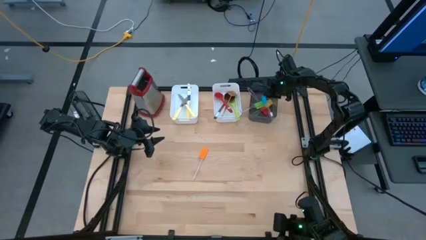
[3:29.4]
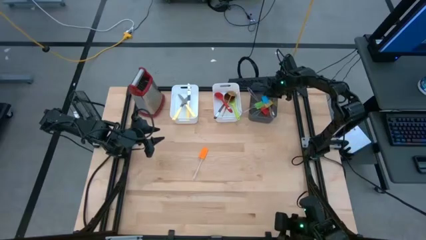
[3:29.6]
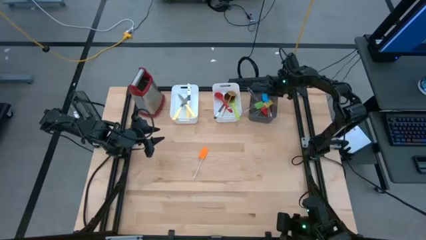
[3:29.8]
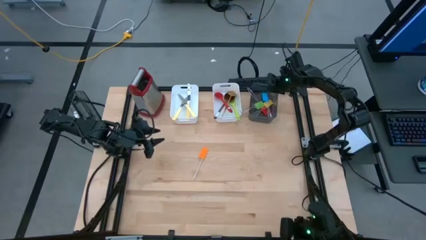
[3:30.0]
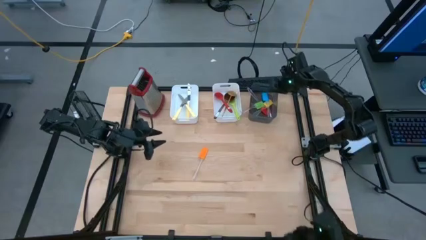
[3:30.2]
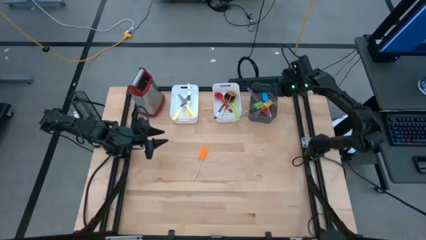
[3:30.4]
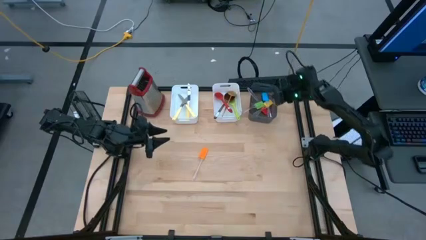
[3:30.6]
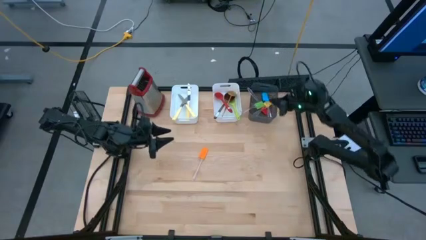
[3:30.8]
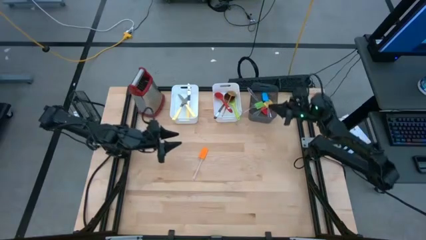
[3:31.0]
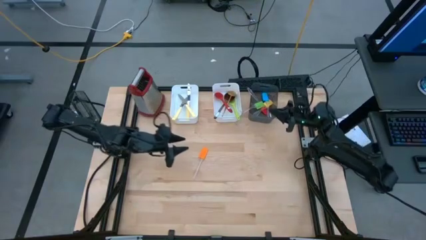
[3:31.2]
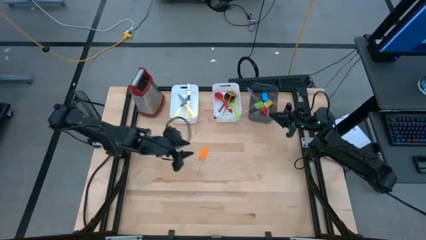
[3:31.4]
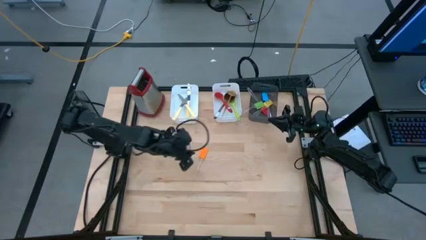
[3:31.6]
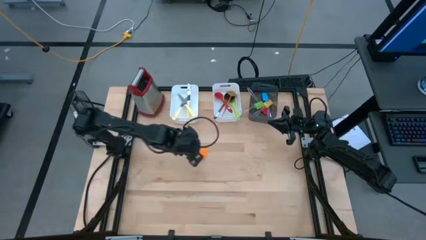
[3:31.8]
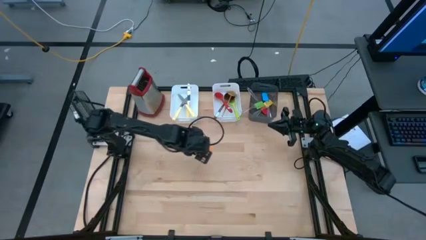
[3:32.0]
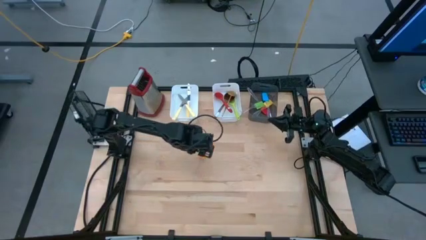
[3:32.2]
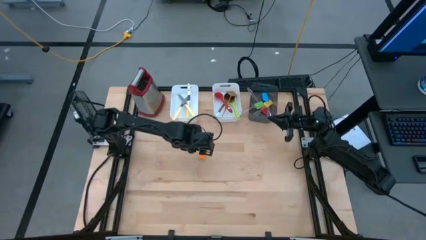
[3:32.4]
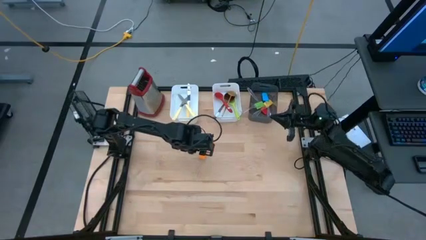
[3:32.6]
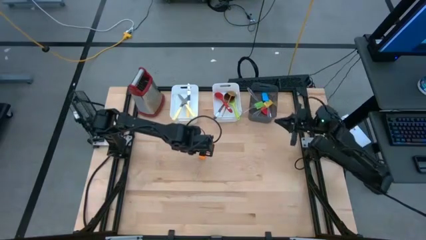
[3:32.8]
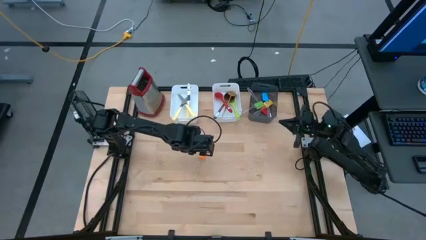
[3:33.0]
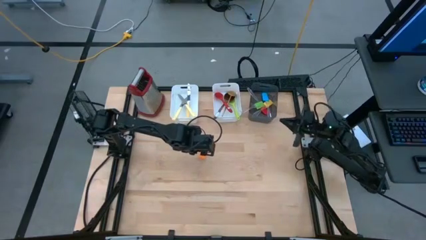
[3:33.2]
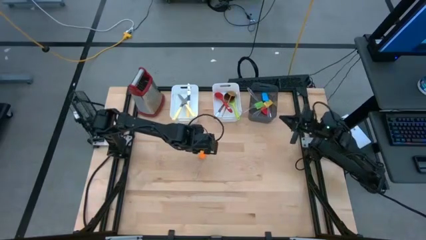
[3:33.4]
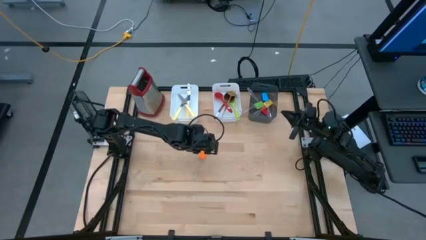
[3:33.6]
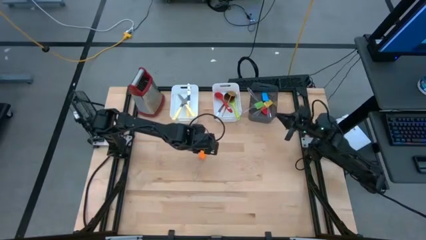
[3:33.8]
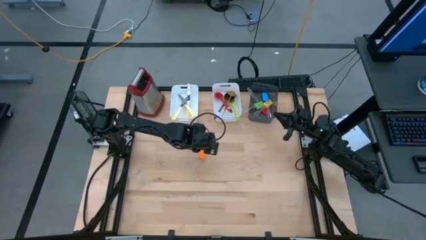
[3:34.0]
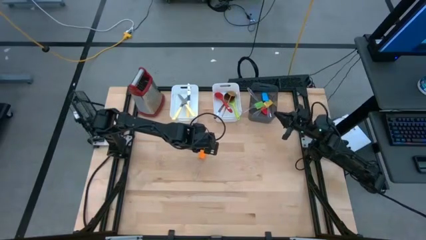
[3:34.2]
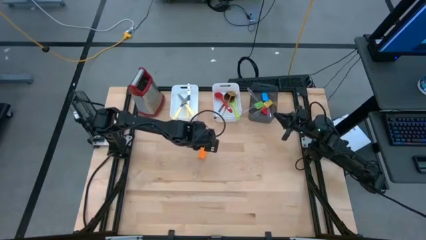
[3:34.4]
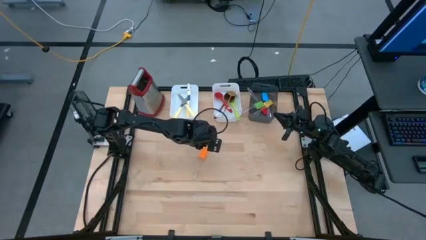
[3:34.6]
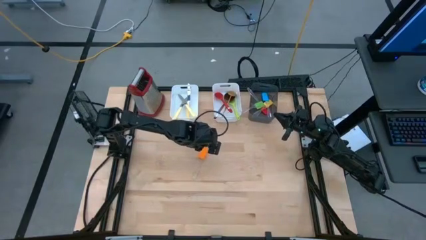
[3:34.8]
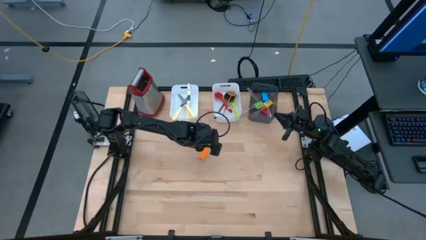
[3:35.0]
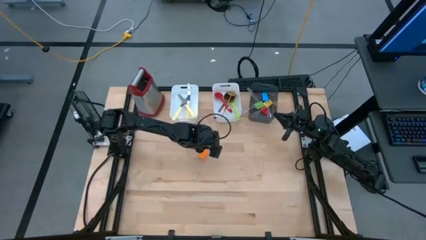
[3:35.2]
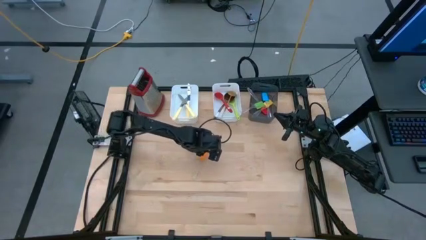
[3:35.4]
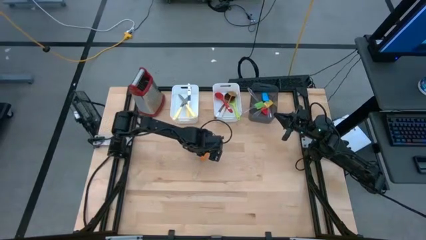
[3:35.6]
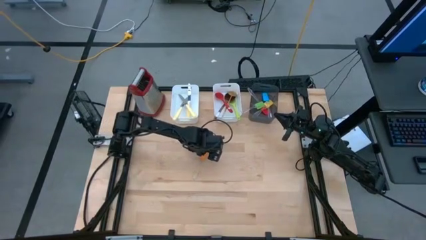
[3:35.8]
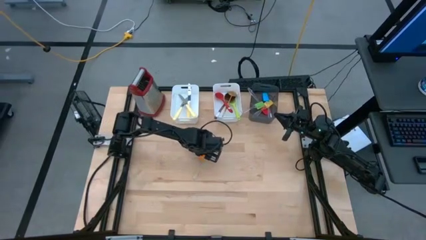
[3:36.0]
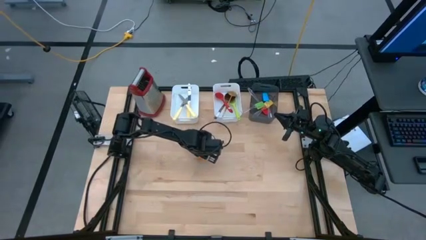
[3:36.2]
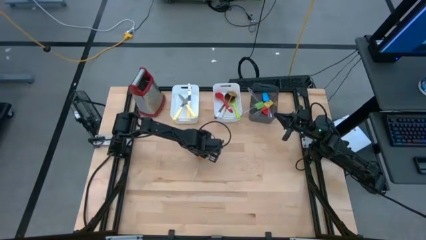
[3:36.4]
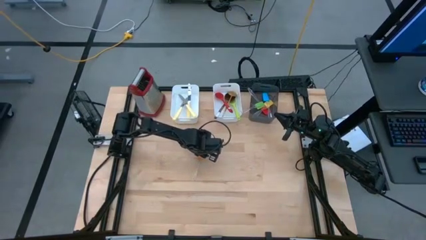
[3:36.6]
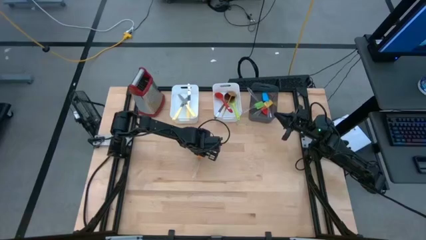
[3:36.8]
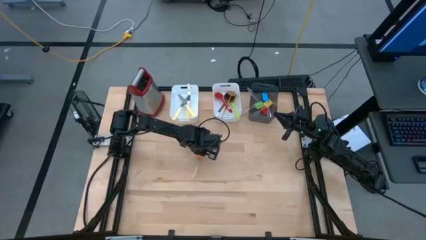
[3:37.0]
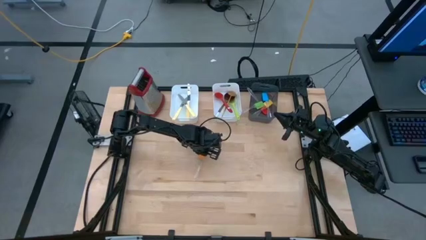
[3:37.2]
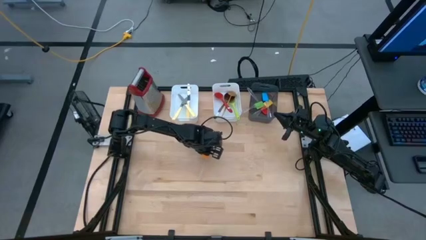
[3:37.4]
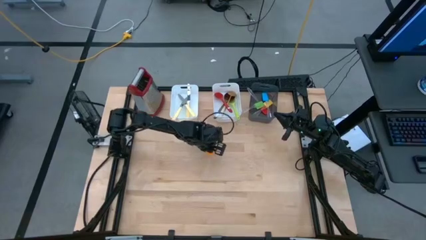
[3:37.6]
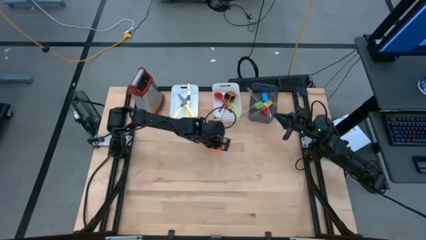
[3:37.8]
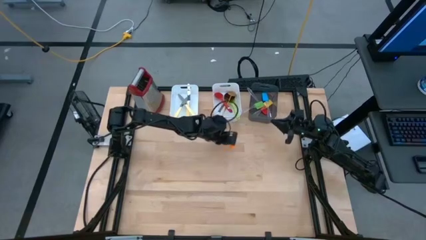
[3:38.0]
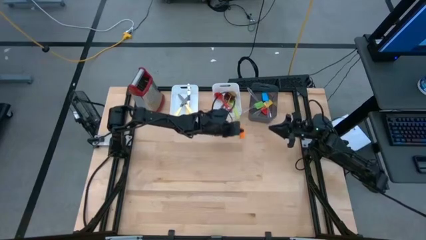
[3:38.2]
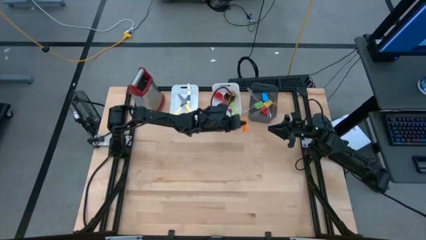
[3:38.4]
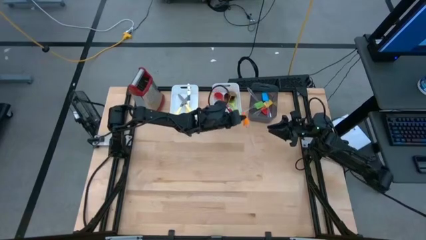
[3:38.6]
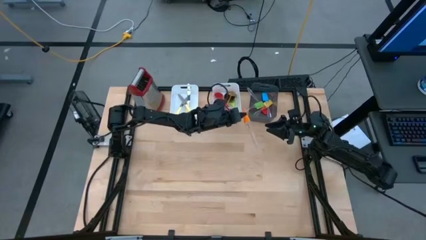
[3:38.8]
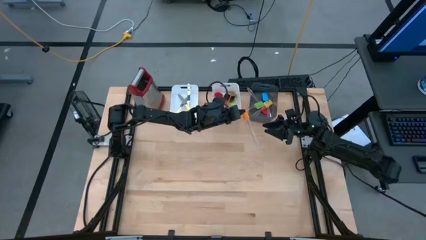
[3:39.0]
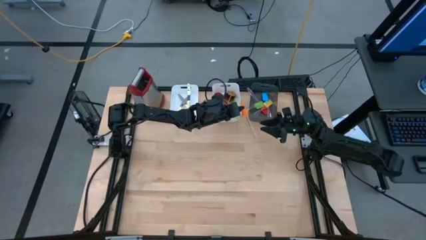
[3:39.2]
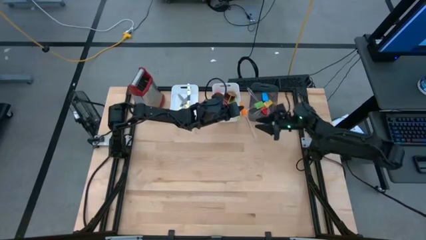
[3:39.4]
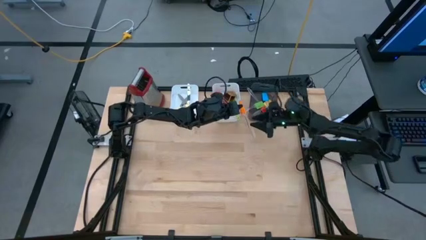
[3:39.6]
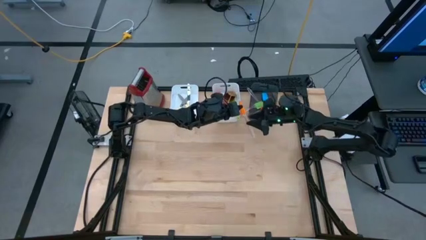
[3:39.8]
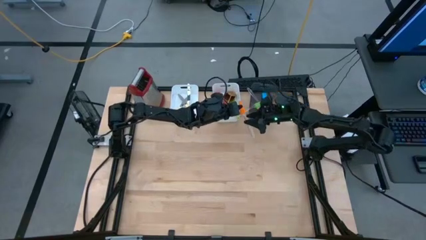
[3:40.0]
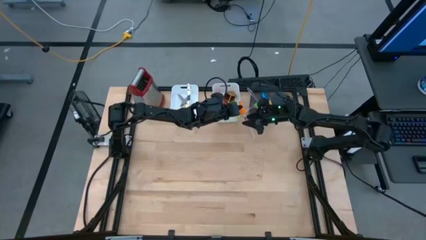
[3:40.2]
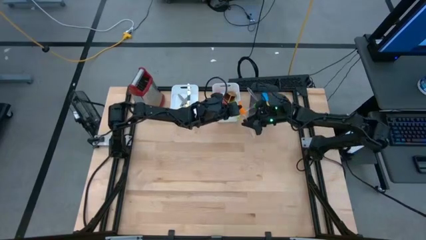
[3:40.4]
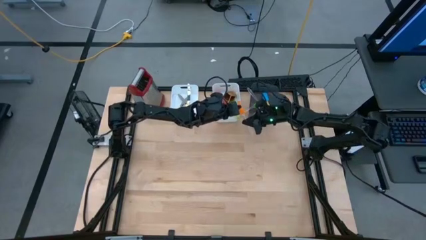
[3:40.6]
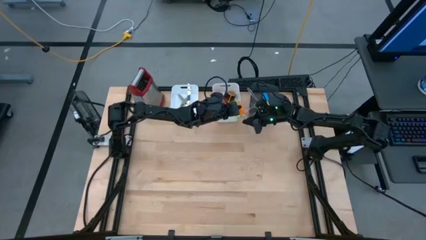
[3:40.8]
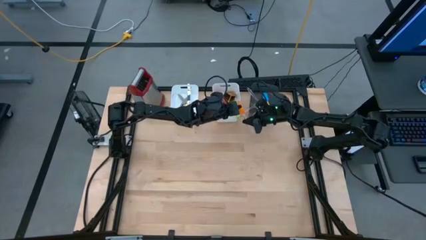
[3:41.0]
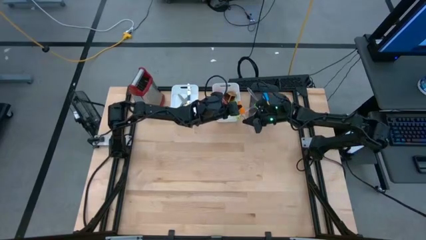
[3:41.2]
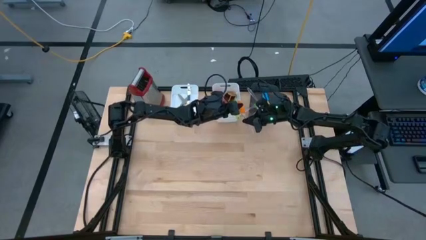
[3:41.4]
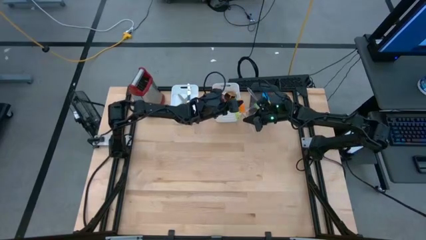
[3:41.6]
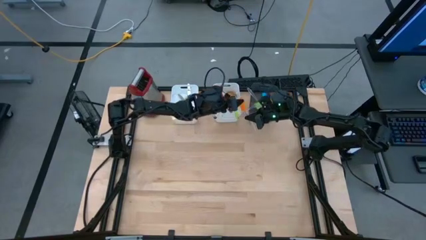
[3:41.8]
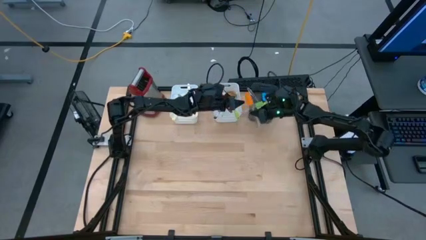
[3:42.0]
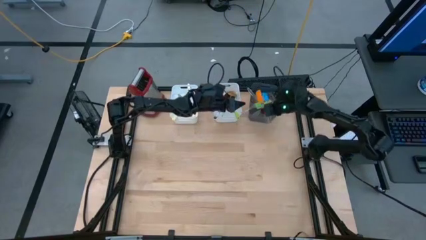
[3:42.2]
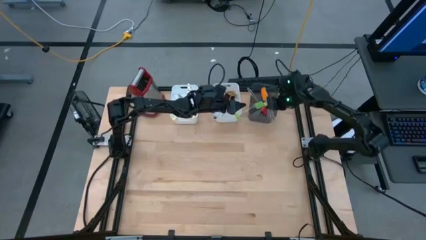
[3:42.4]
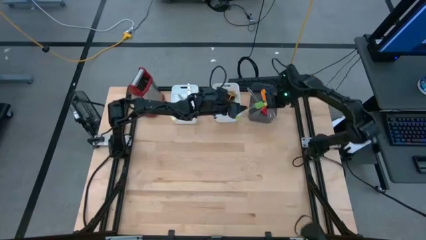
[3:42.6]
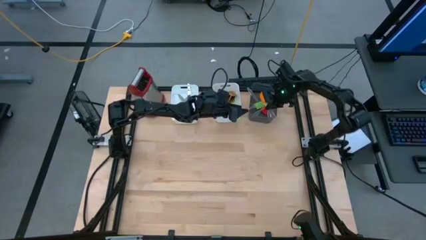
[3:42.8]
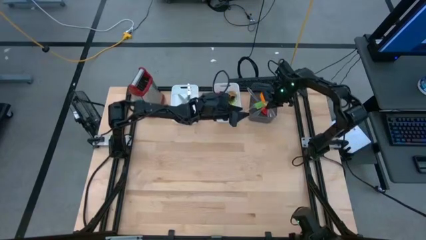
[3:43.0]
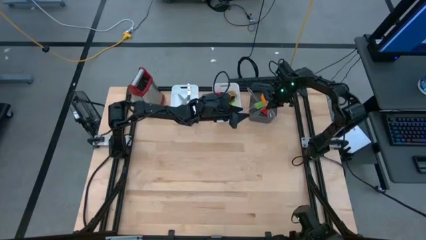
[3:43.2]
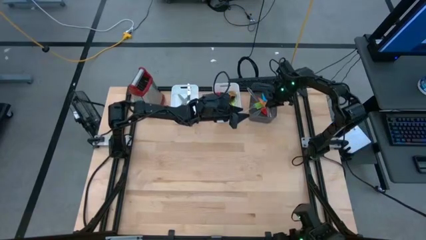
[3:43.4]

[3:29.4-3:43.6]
Task: Pick & Place Kitchen Items
Put the orange spatula into the black bin
